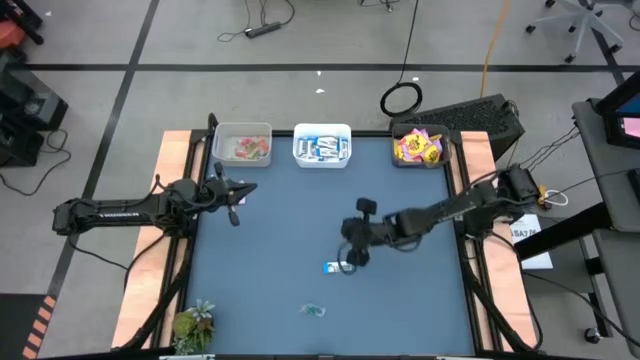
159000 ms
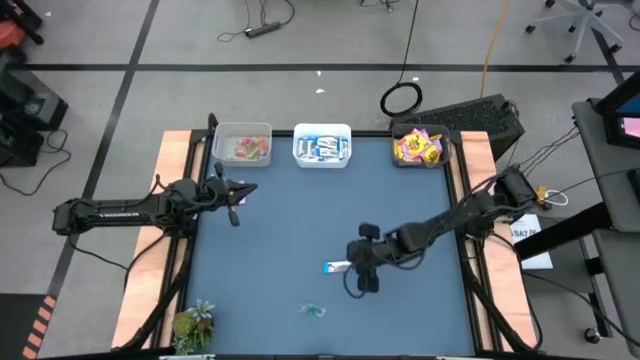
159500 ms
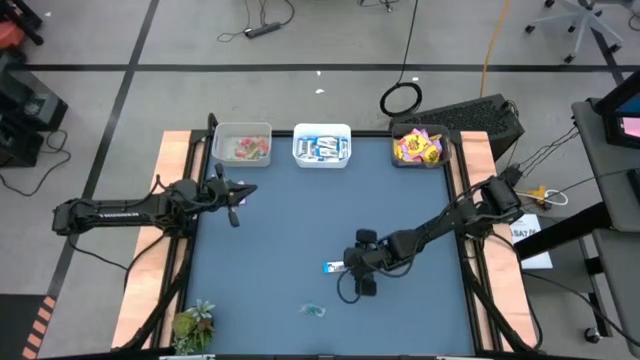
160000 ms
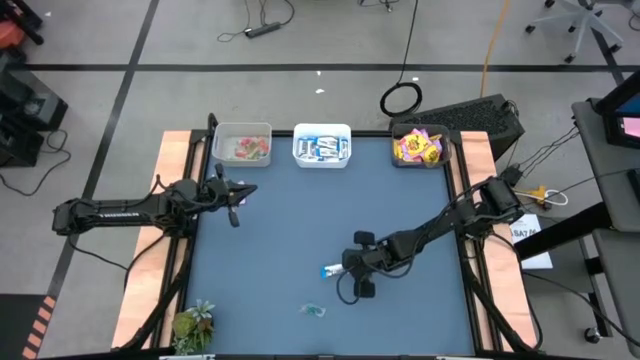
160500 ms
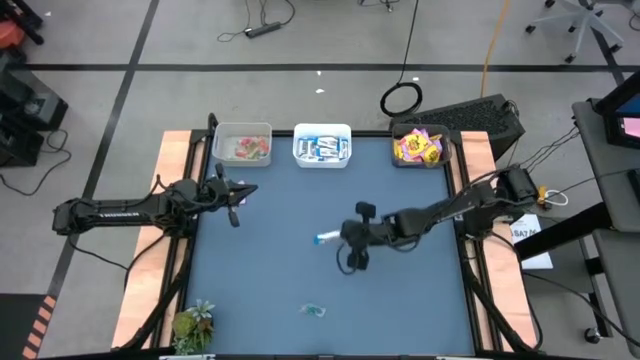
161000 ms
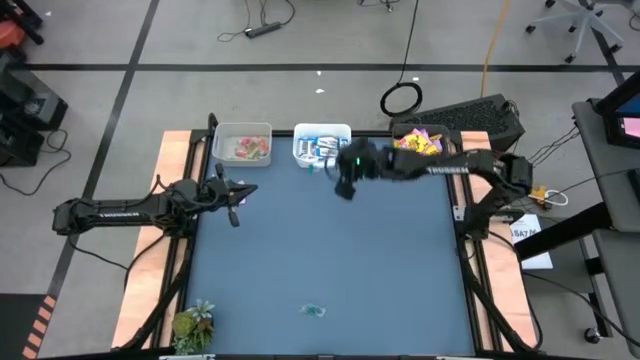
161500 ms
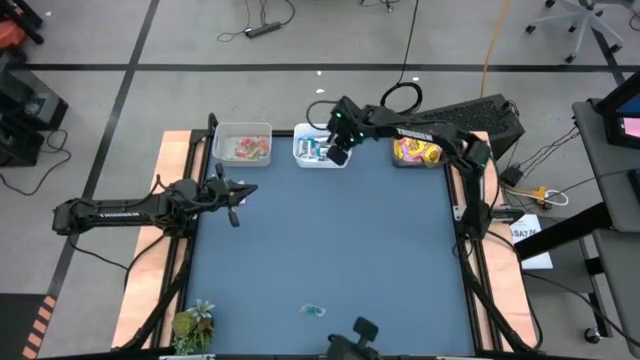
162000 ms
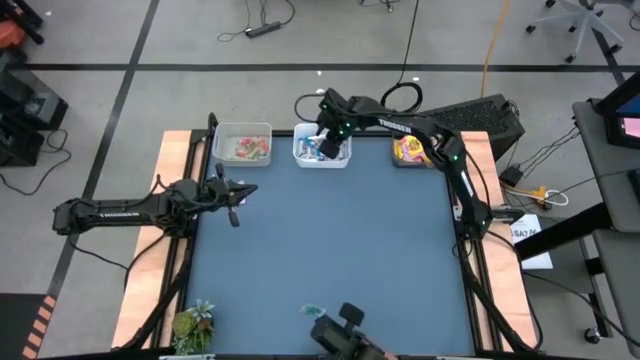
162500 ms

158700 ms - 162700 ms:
Task: Sort candy
Put the white chocolate into the white bin

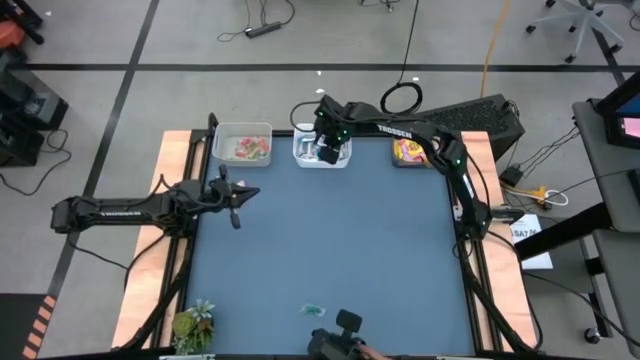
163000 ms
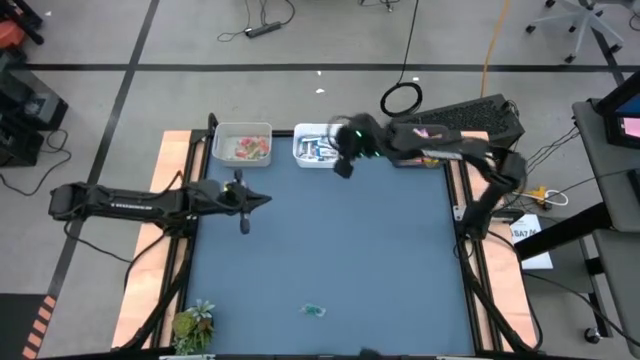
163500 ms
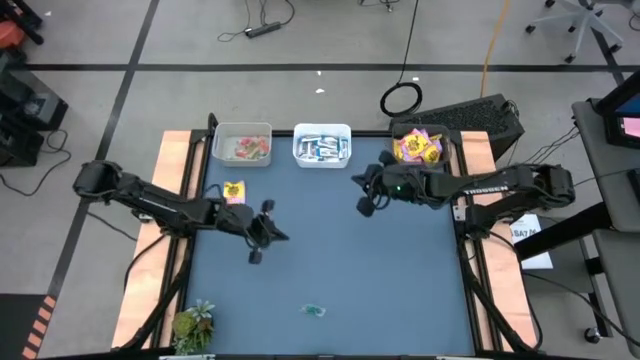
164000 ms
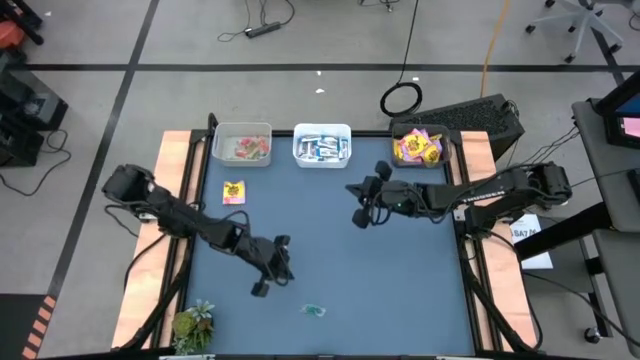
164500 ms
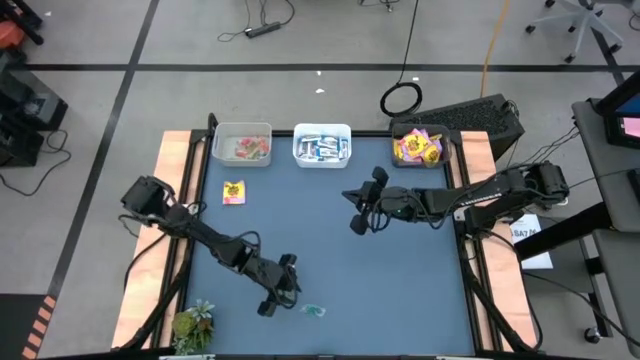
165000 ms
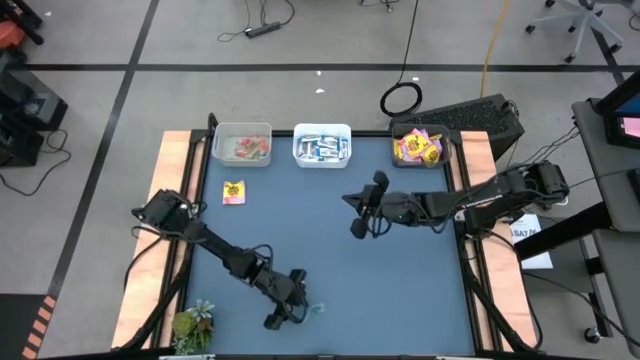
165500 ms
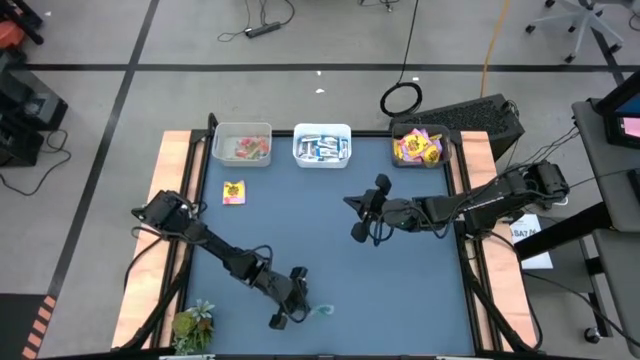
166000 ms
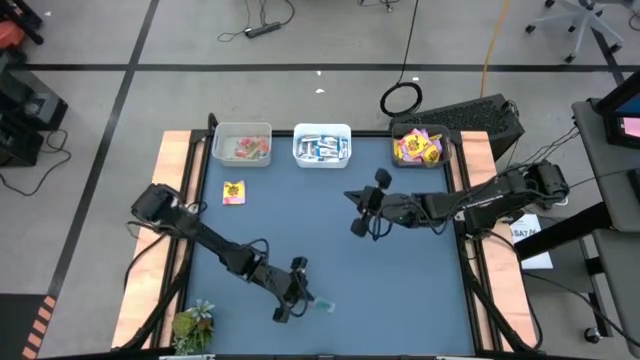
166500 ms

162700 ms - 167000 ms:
Put the blue gummy into the gray bin

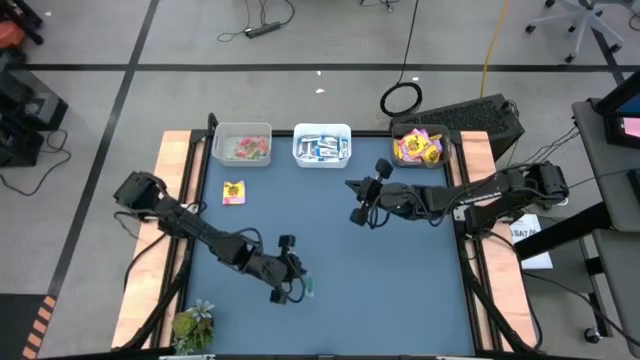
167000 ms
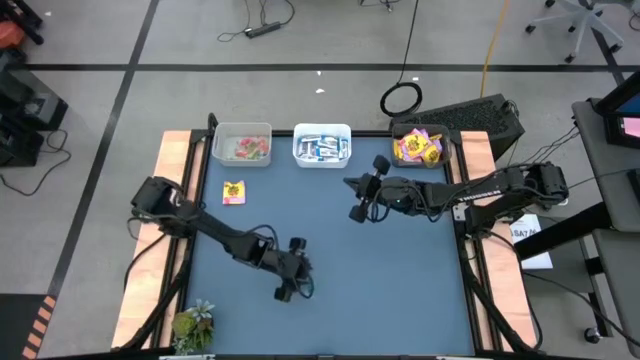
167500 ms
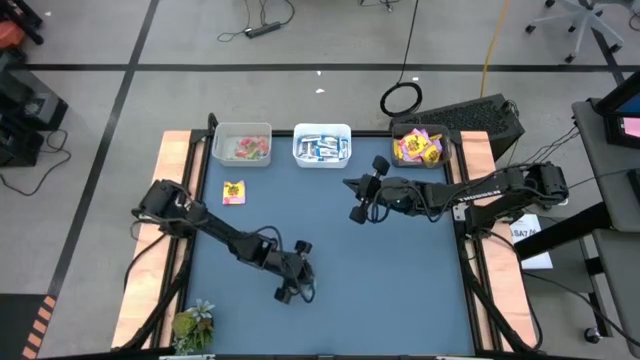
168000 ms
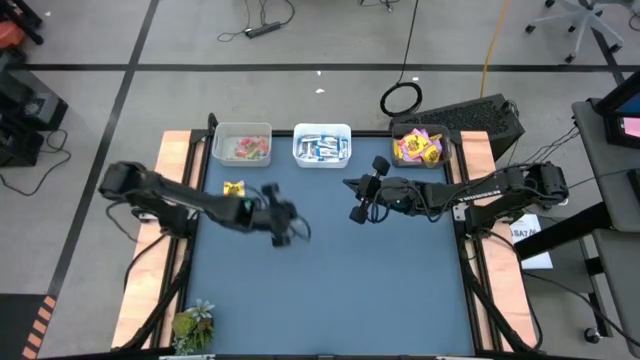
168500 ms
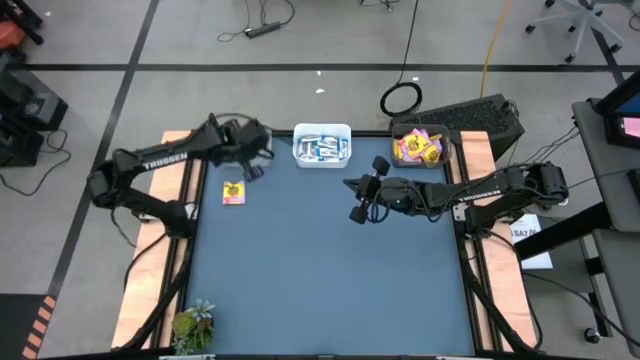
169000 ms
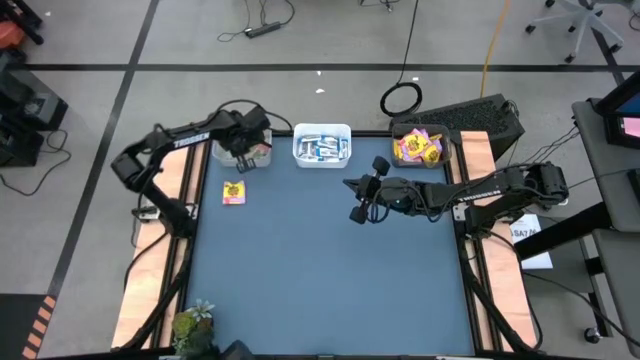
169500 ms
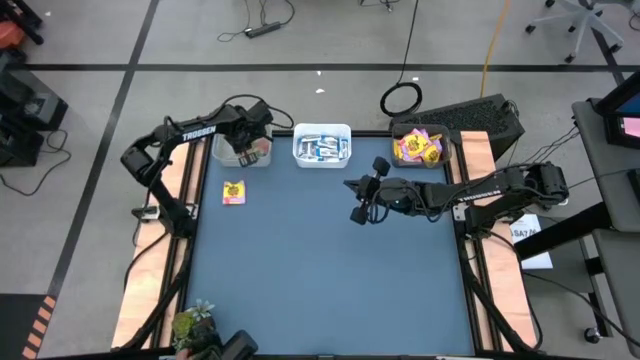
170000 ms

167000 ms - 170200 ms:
Put the blue gummy into the gray bin

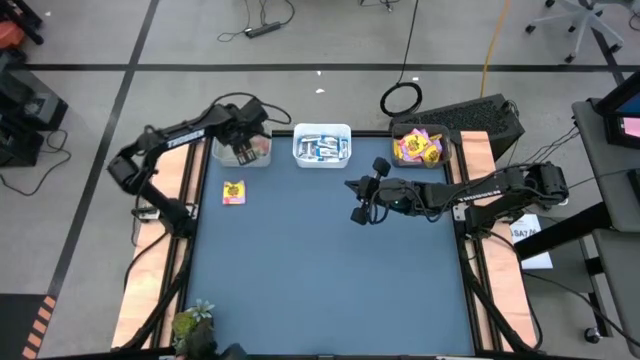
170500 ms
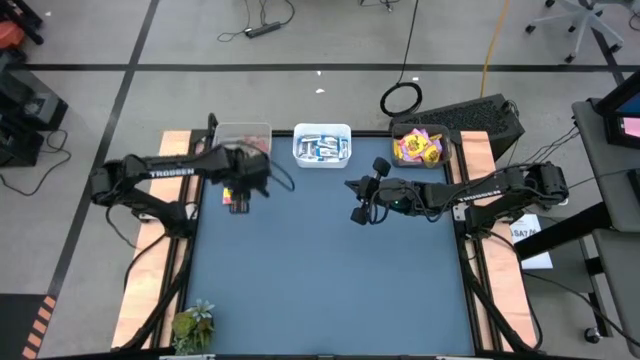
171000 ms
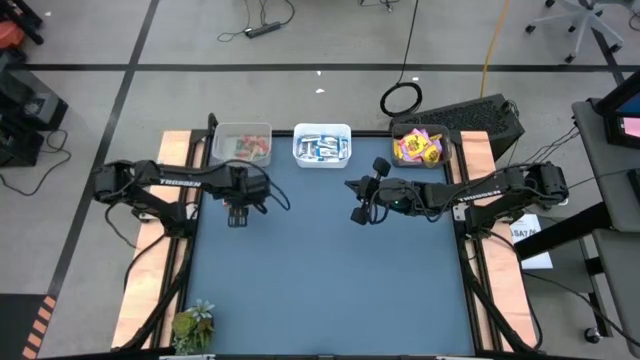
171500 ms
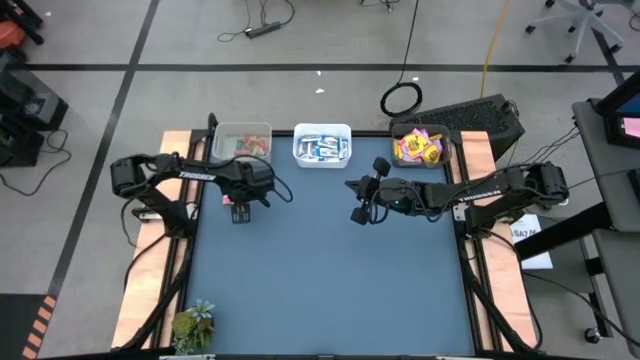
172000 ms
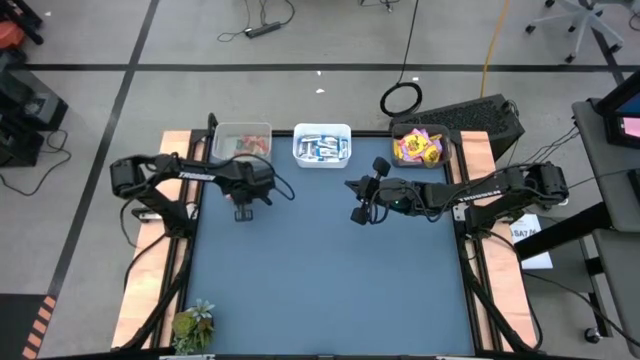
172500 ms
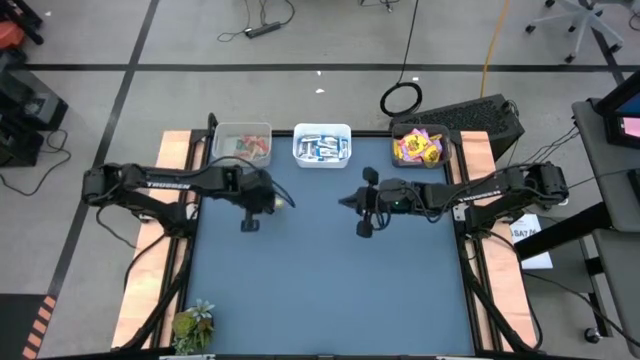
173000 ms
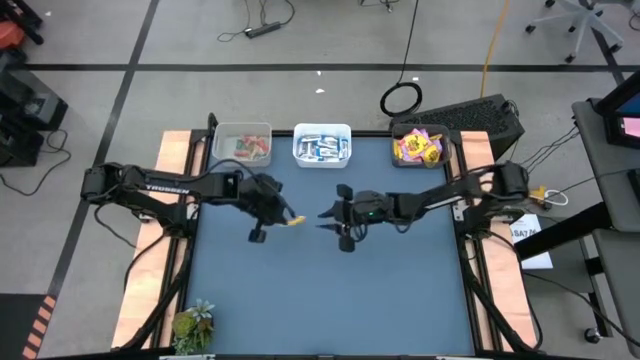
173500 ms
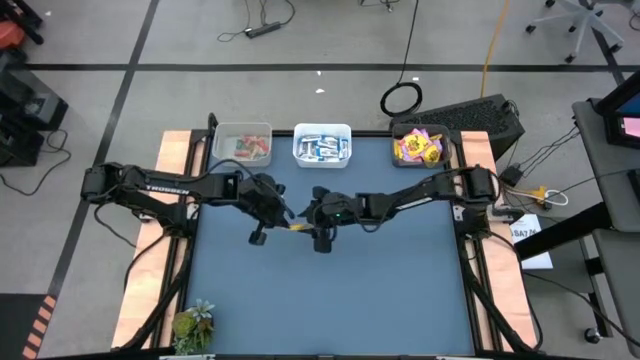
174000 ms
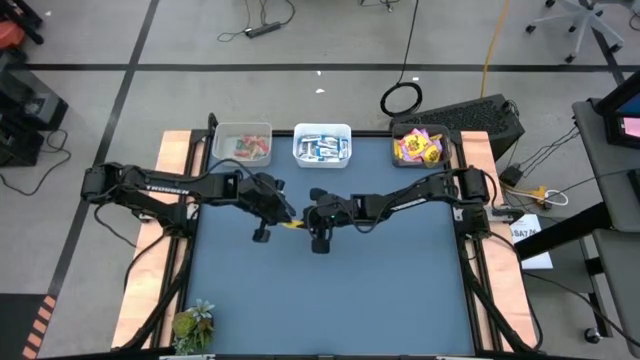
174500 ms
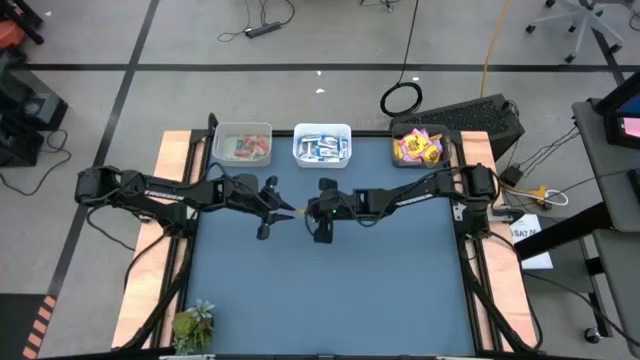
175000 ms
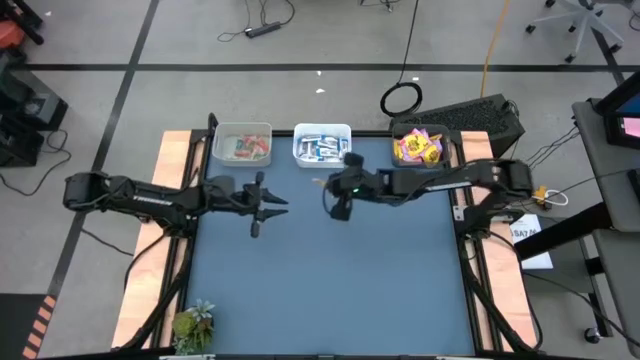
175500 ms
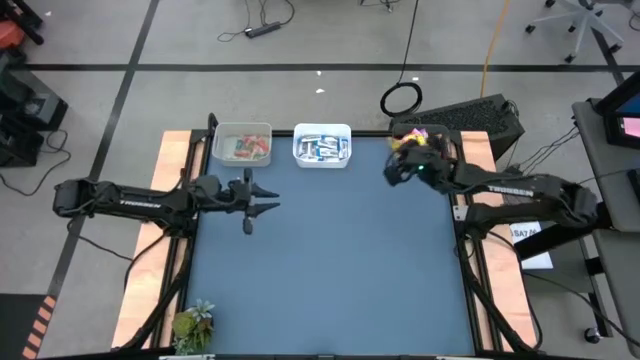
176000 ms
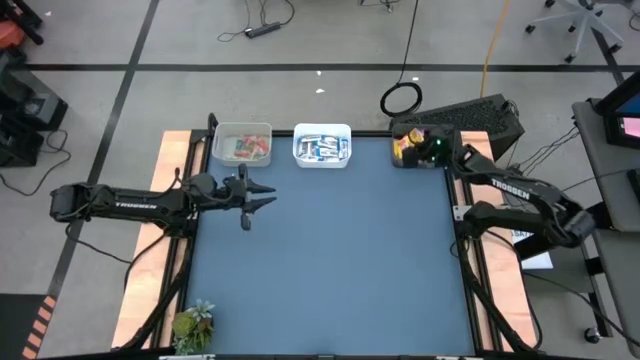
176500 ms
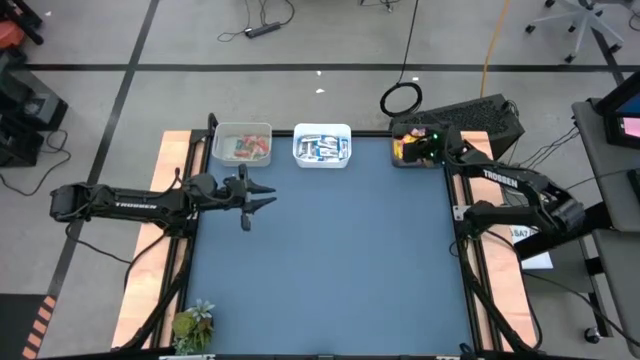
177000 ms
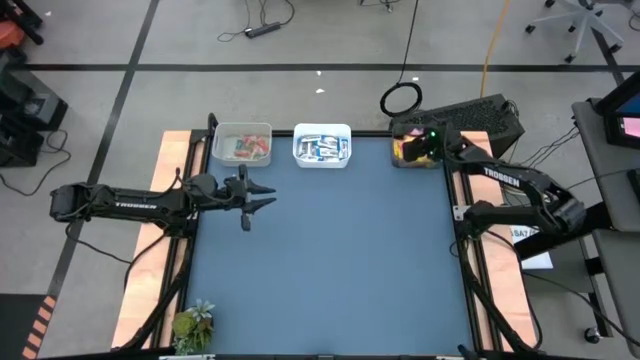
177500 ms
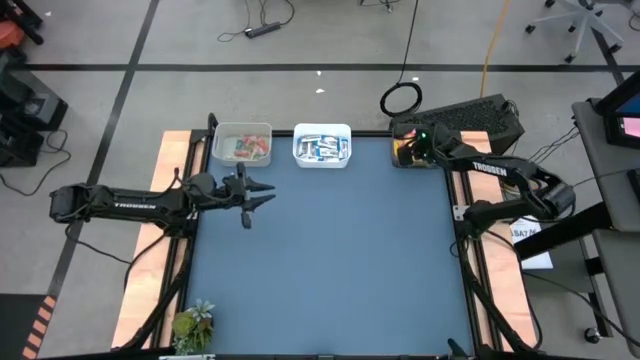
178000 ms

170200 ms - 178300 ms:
Put the yellow candy into the black bin
